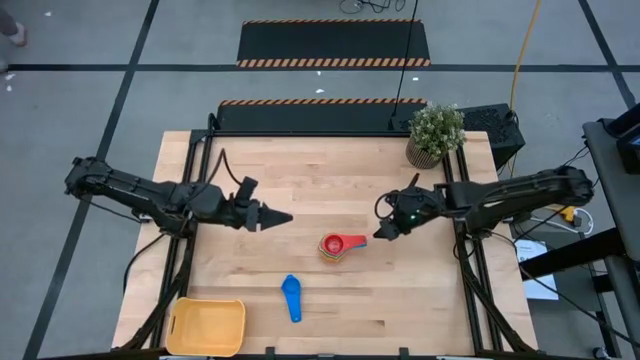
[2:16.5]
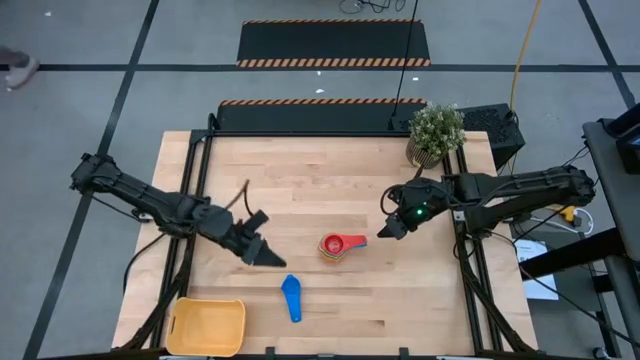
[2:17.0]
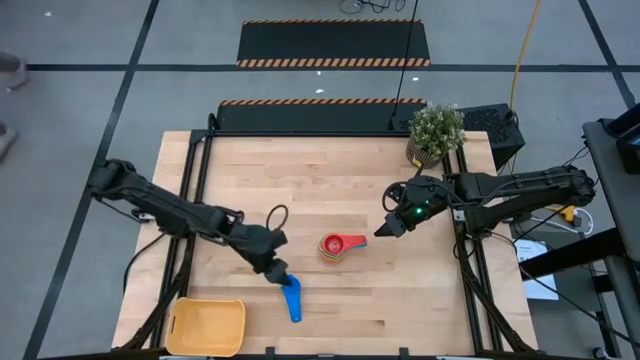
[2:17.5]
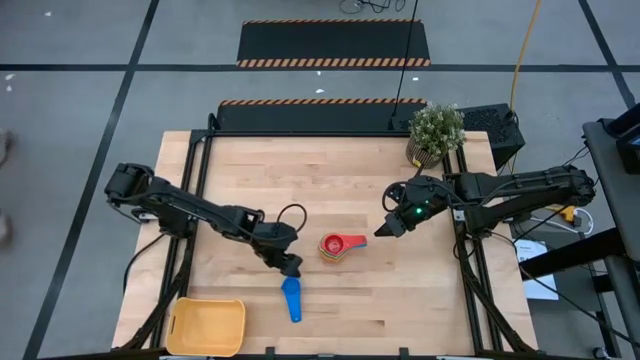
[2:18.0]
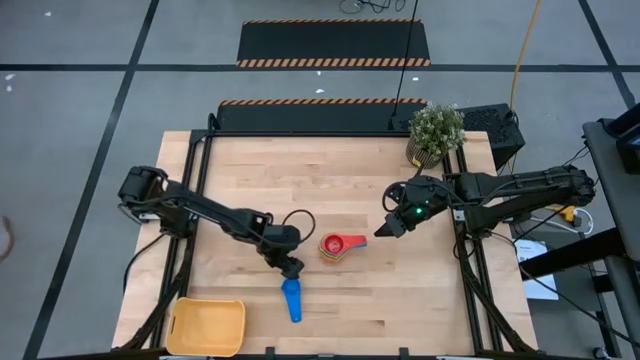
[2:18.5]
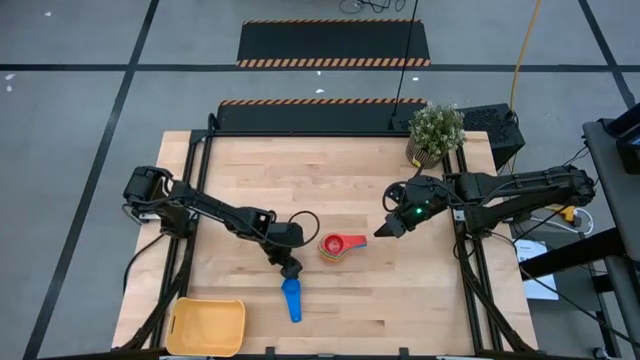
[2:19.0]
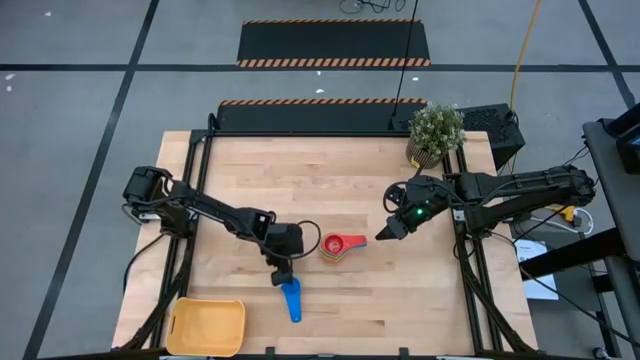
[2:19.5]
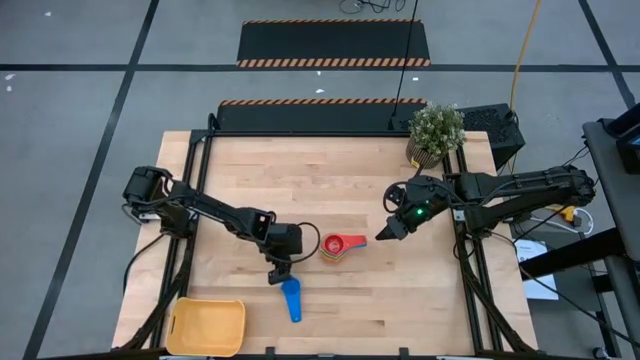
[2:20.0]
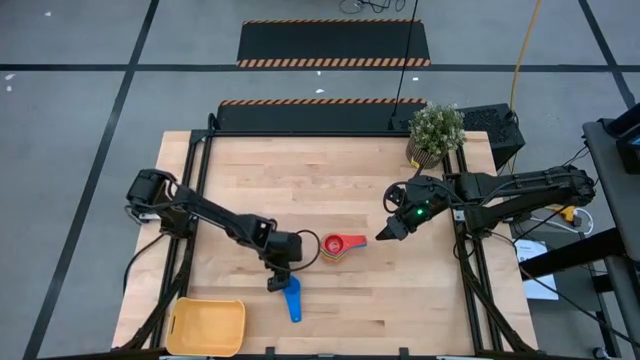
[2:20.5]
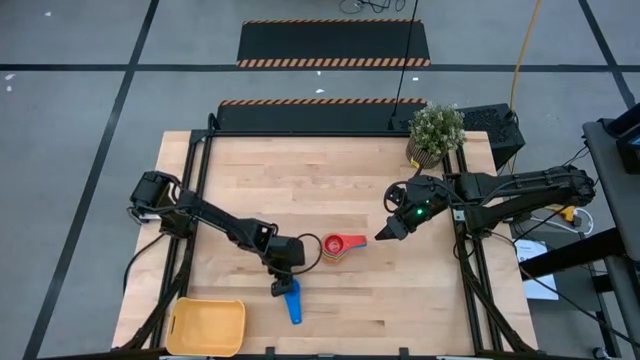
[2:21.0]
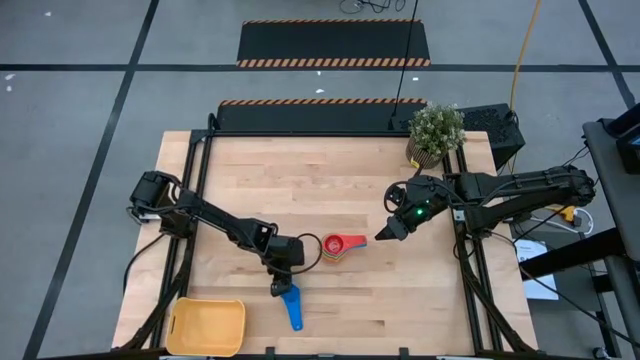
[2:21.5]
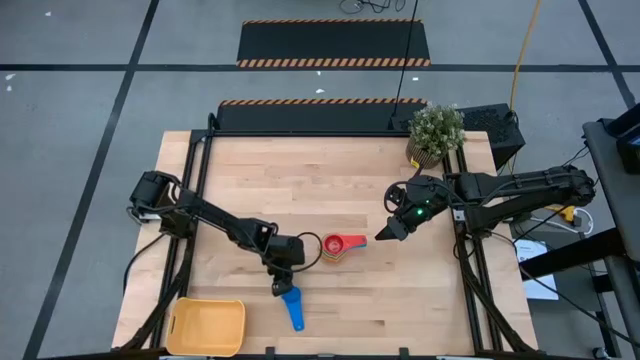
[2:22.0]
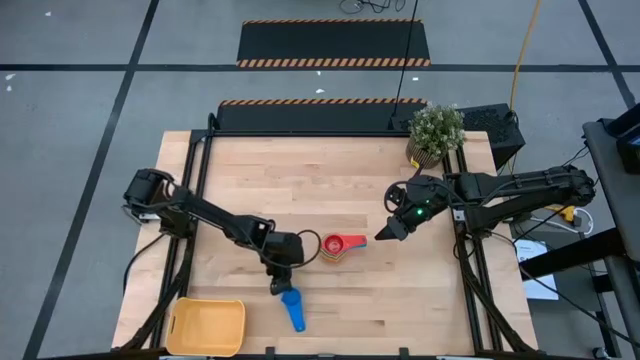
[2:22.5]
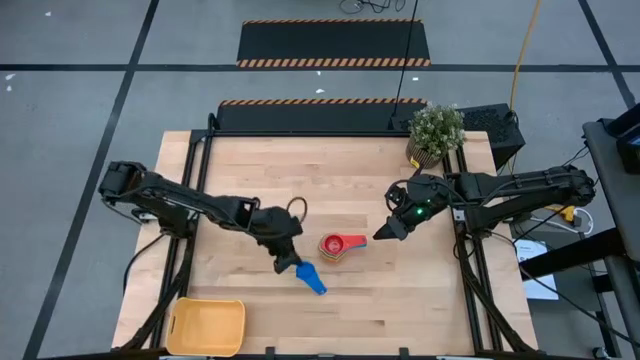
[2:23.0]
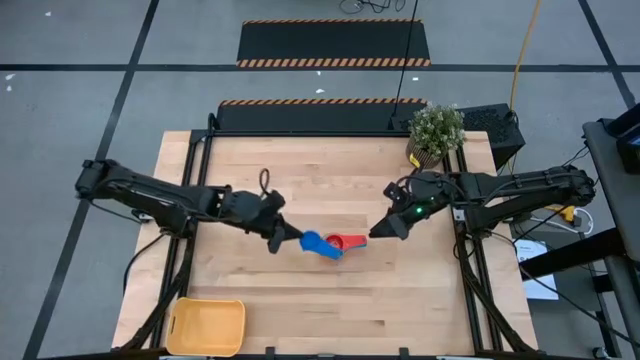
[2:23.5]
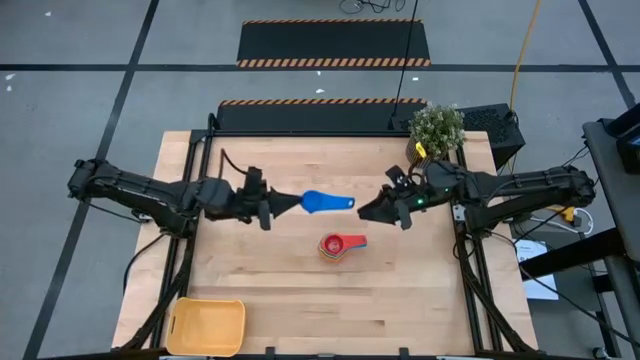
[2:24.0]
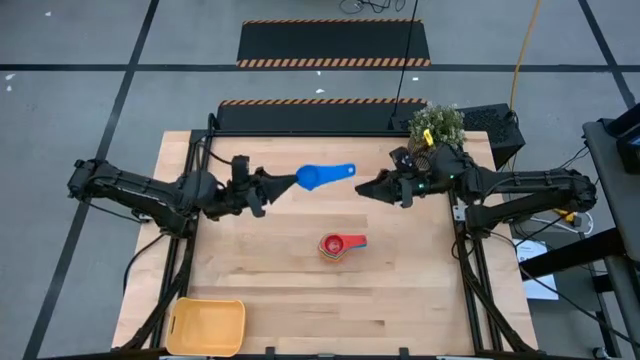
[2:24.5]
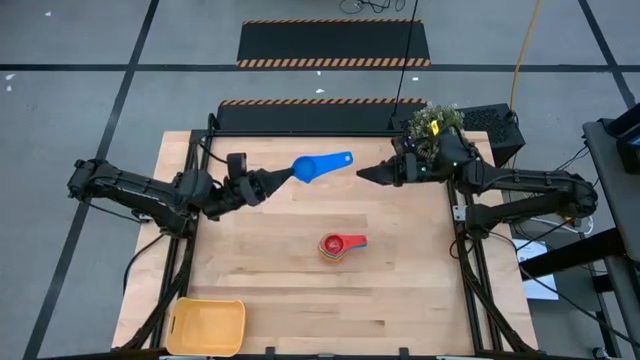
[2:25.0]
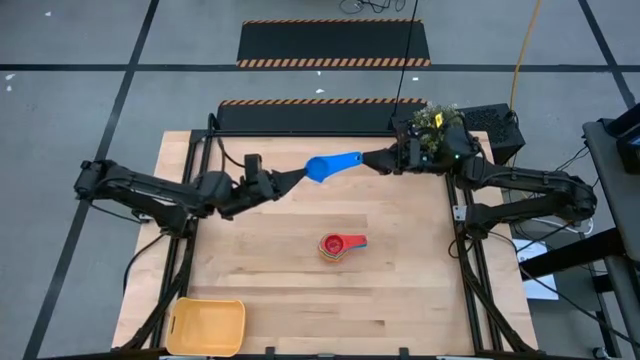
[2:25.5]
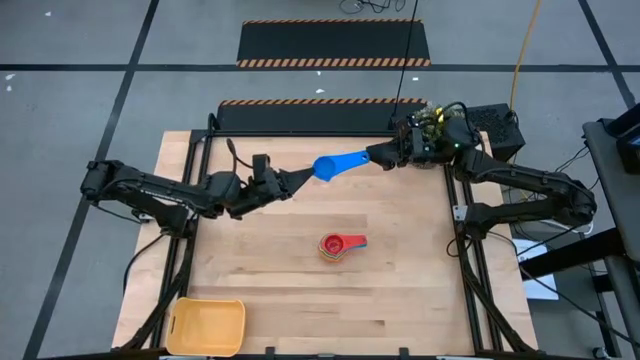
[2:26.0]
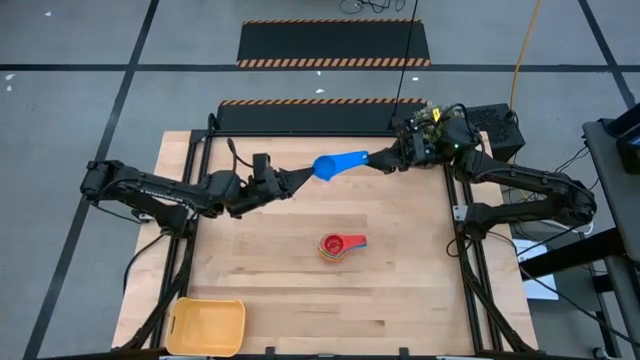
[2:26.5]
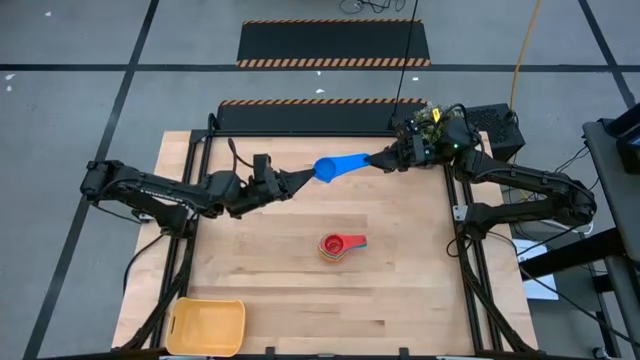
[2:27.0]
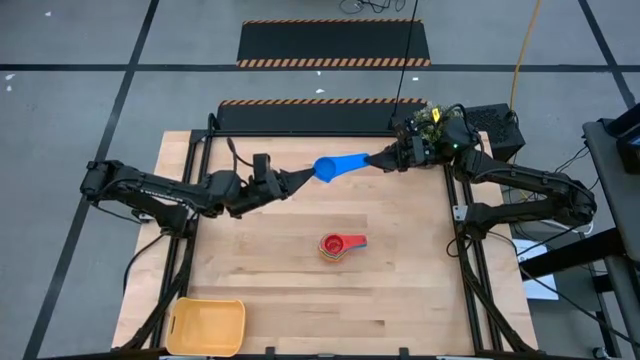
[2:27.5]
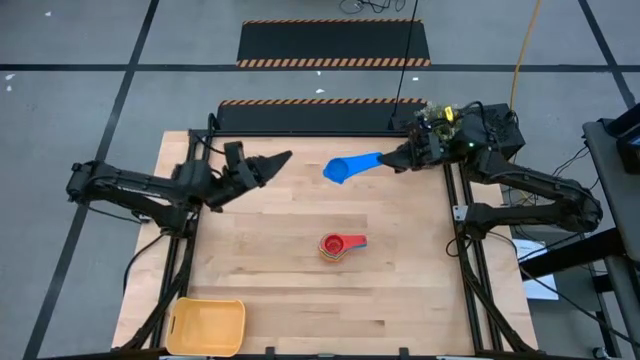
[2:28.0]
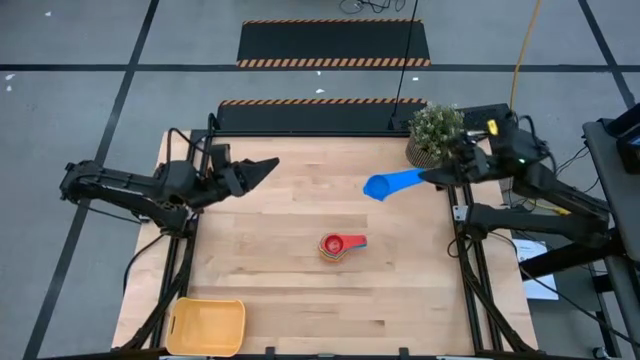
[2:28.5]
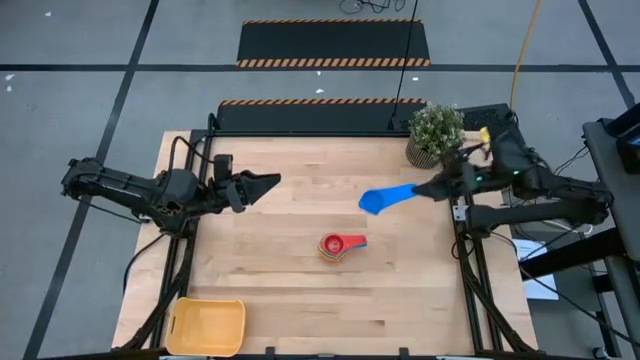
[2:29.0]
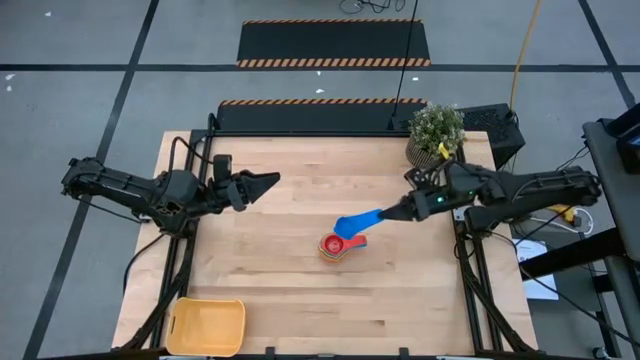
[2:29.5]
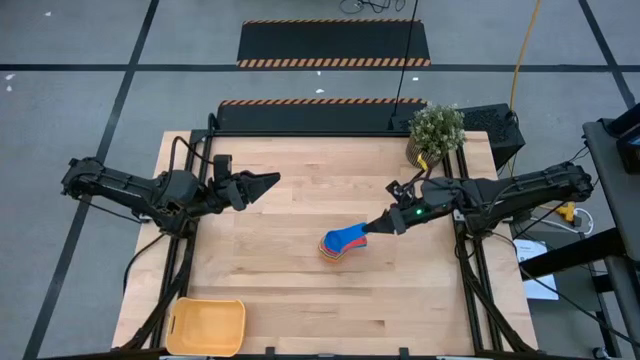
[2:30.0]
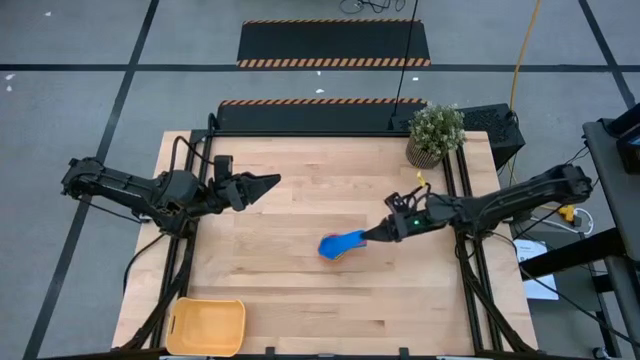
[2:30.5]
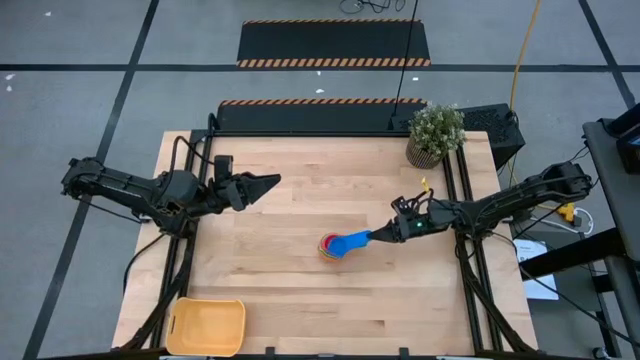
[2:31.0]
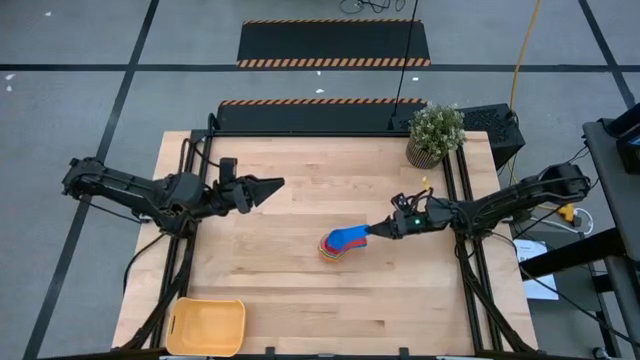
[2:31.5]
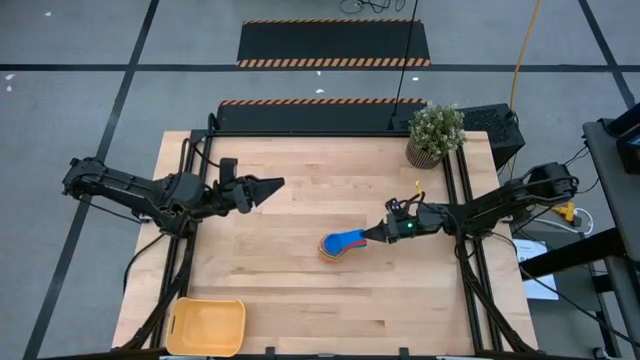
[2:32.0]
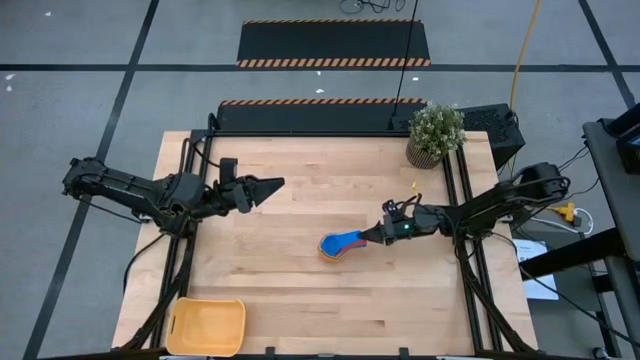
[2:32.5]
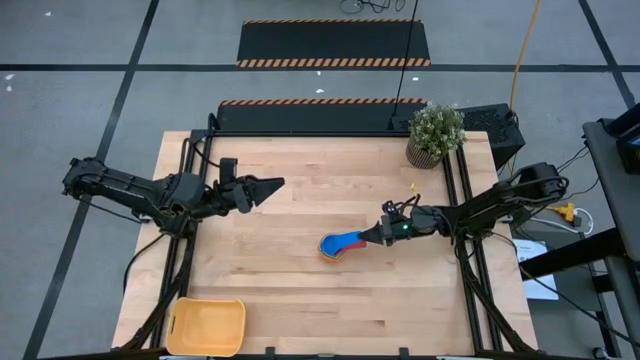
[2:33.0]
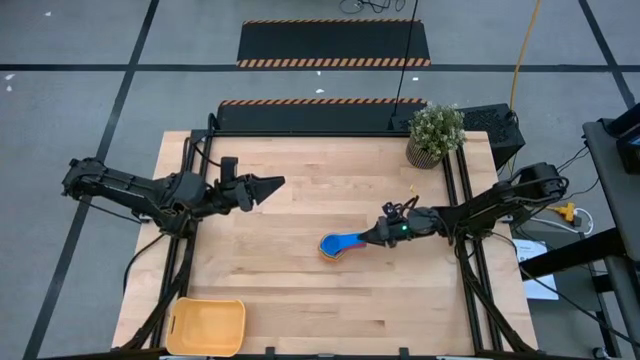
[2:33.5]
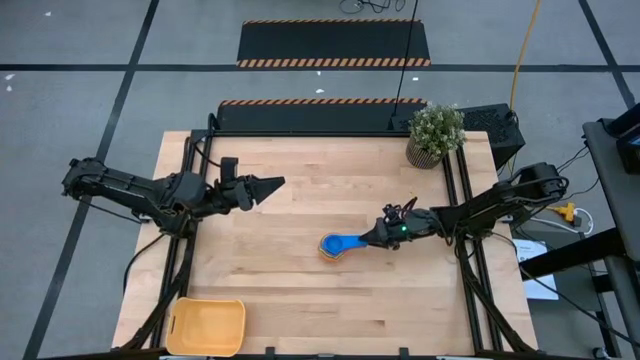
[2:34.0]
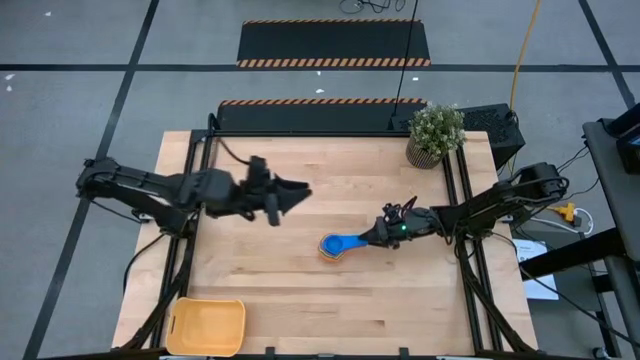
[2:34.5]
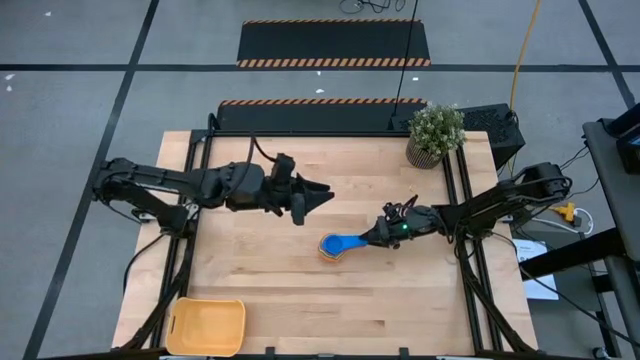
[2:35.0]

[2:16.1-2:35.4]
Task: Nest measuring cups in basket
Stack the blue measuring cup on top of the red measuring cup

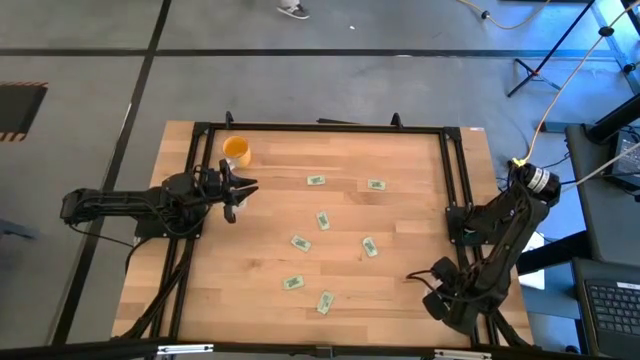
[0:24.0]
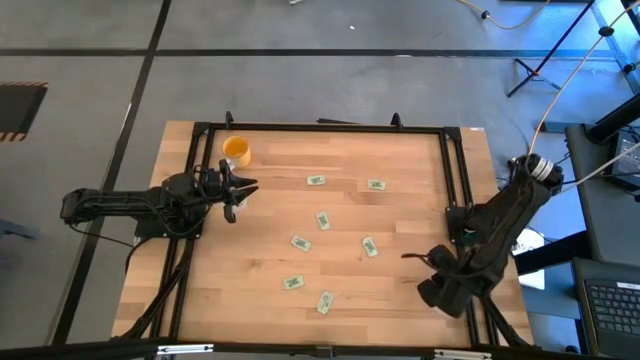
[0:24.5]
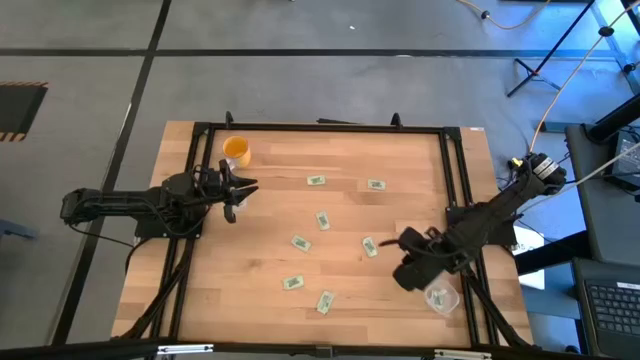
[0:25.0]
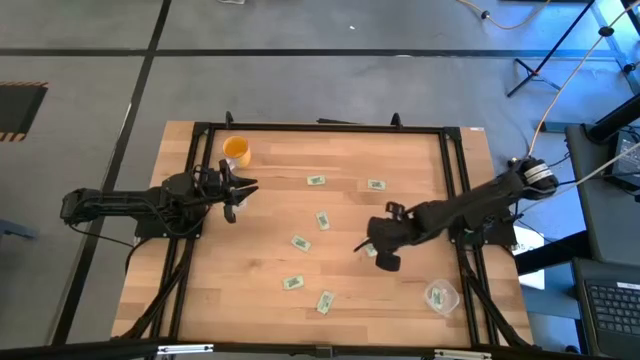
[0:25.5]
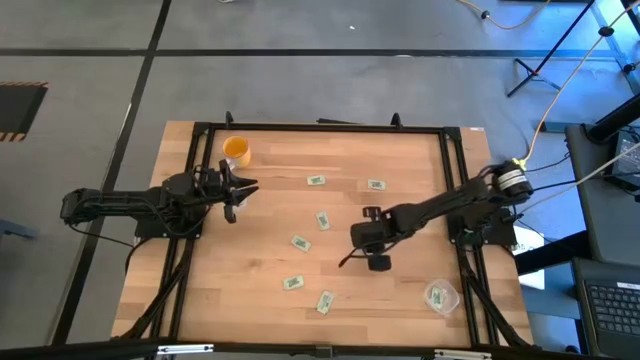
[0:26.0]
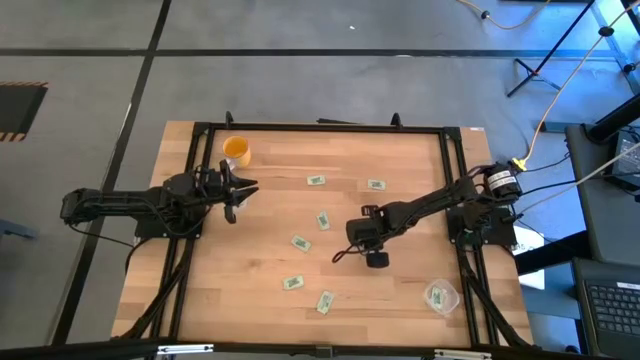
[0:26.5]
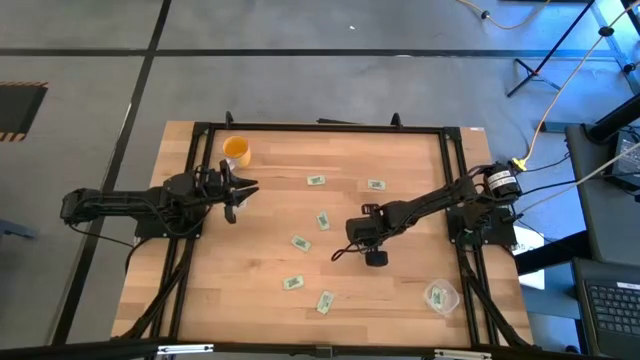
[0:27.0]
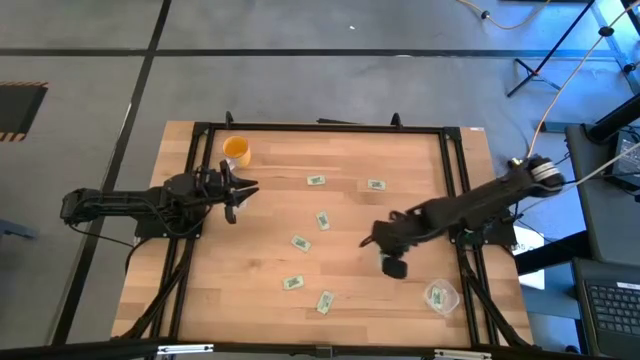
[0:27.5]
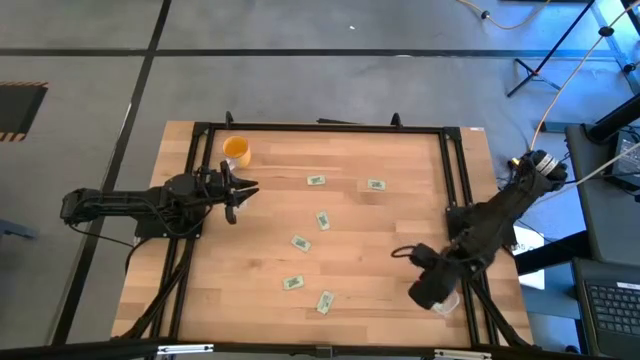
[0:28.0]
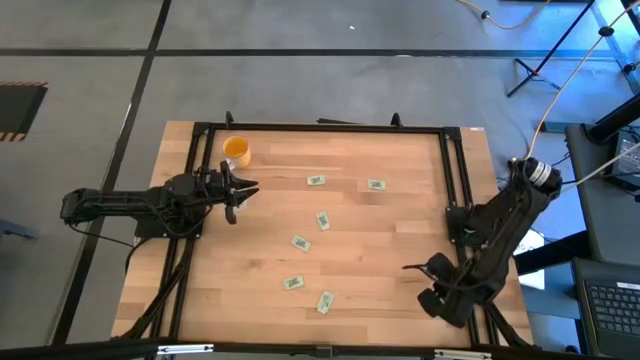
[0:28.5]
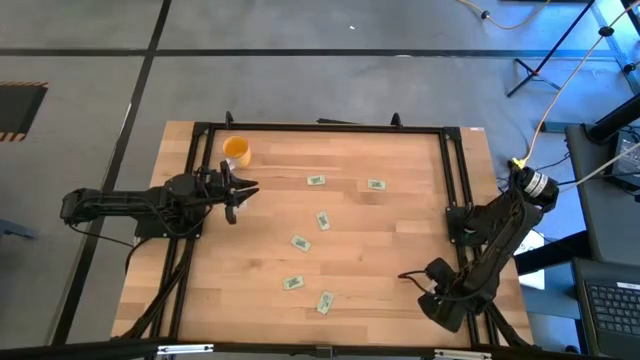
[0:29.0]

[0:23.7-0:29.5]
Task: Pick and place items into bin
Put the green stevia packet into the bottom transparent bin
